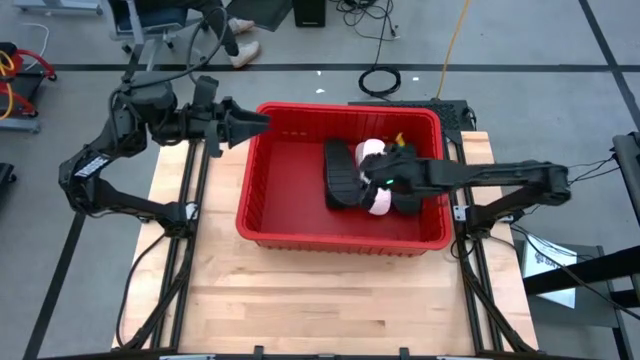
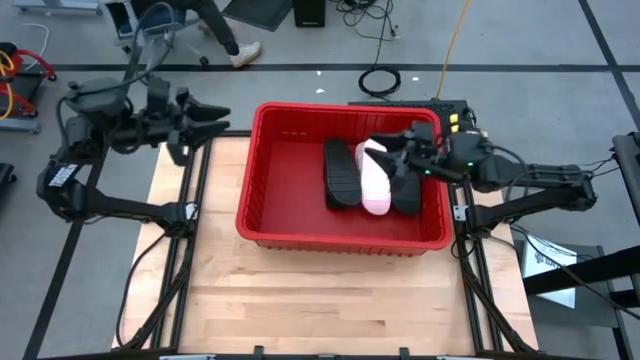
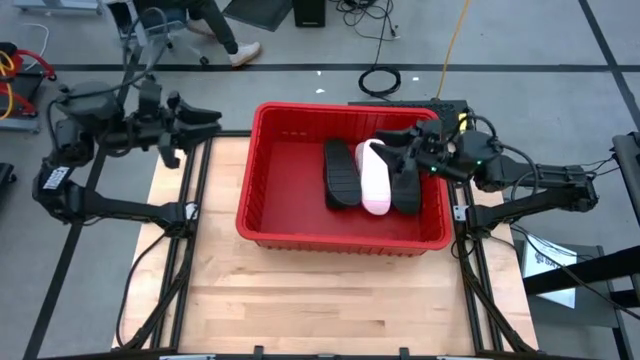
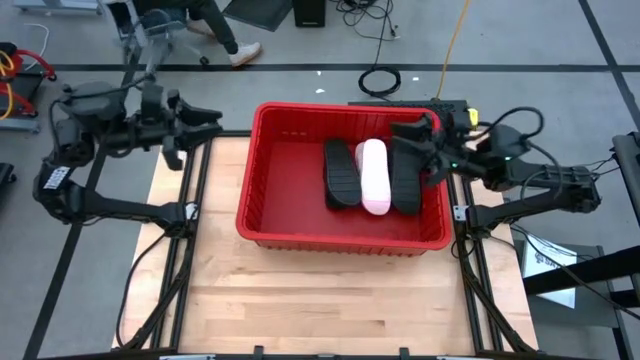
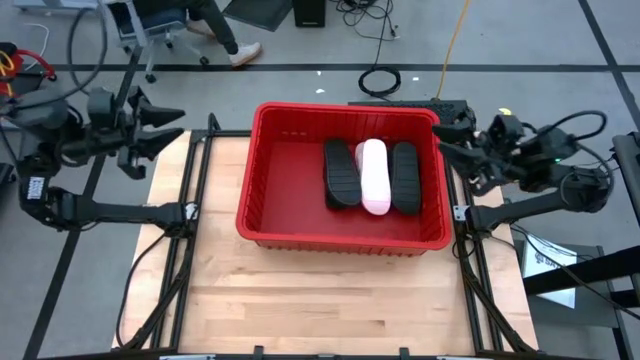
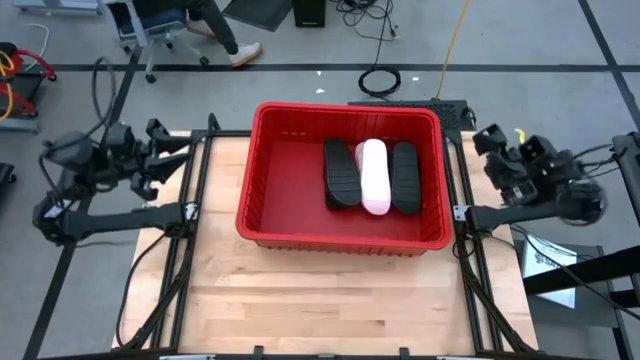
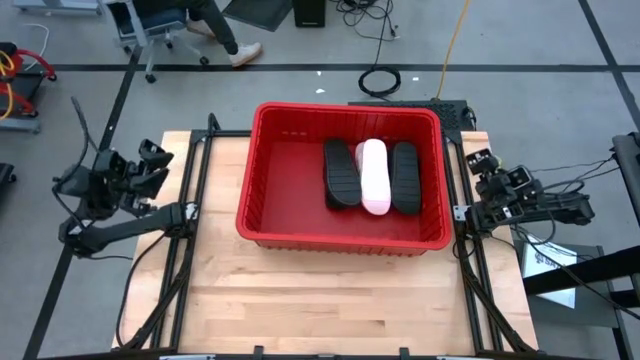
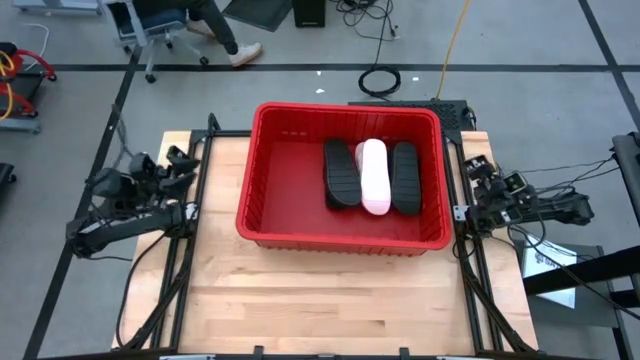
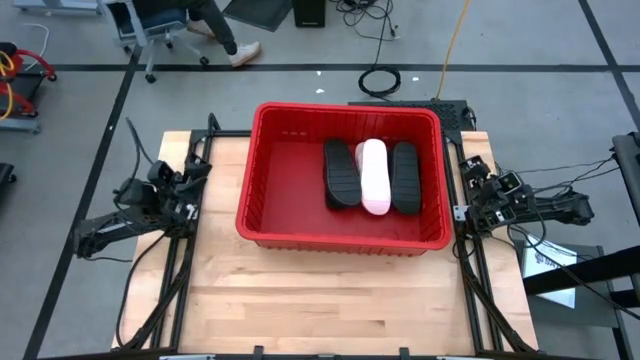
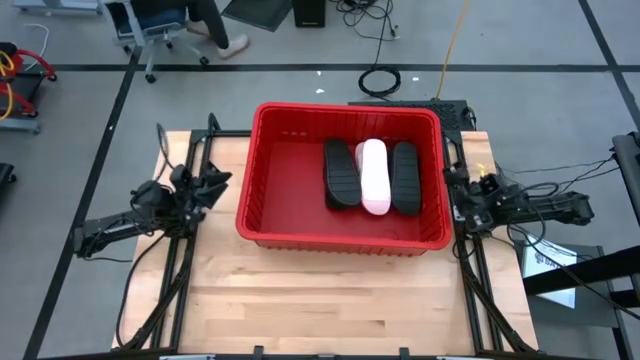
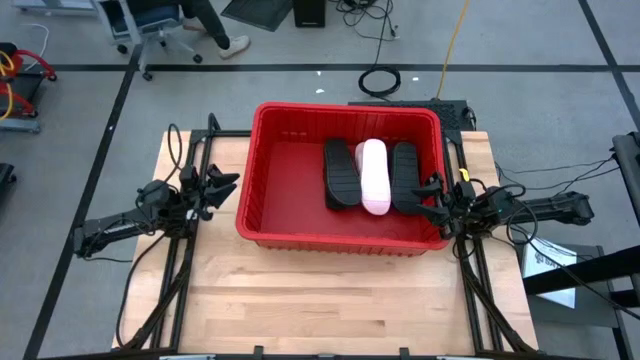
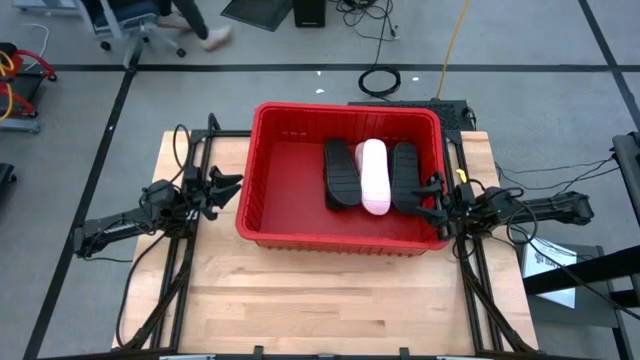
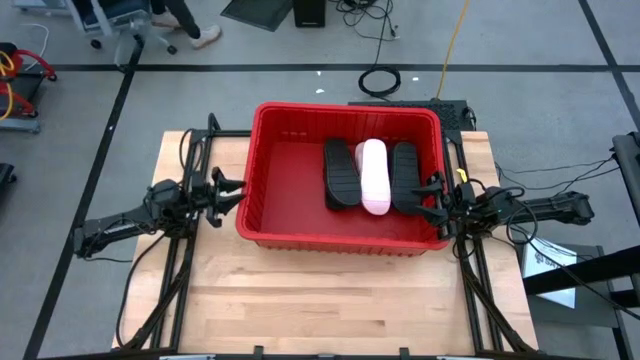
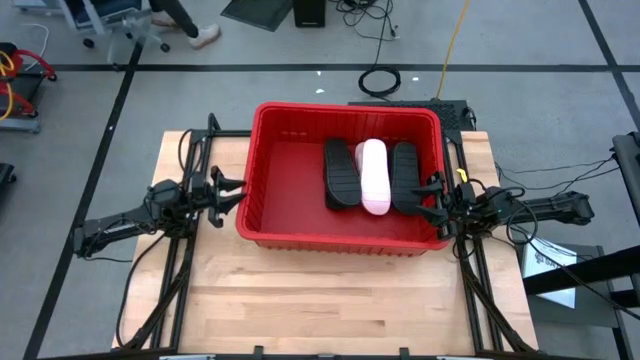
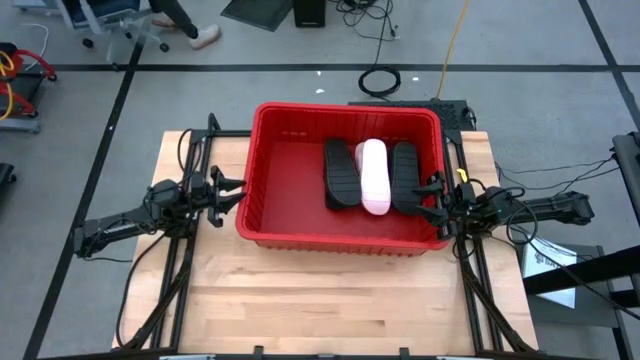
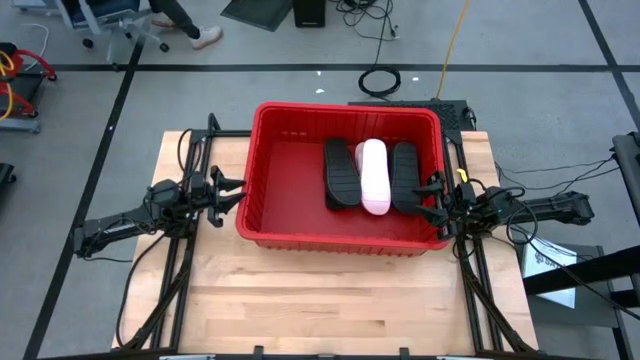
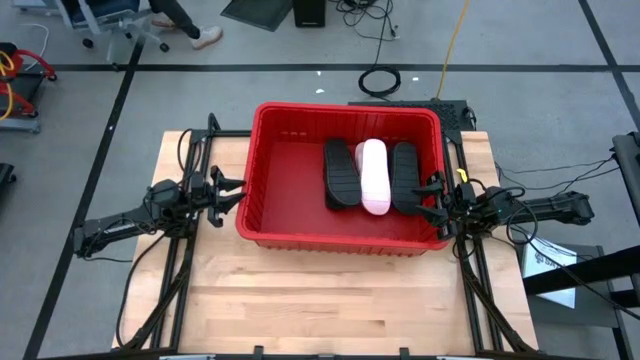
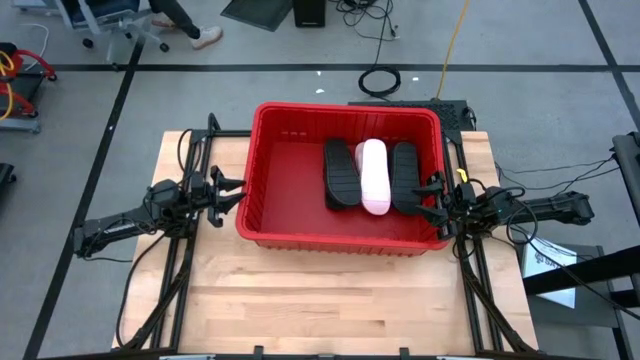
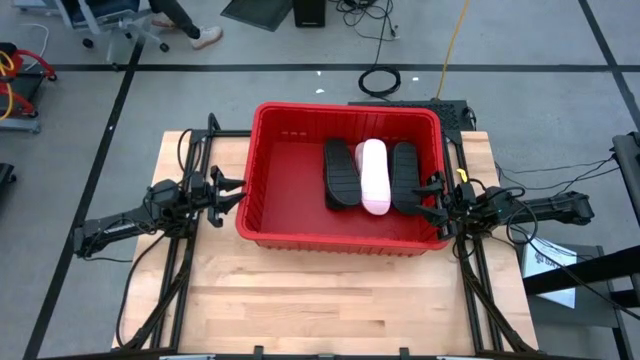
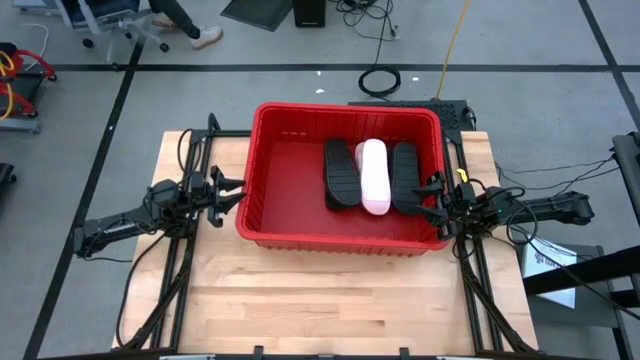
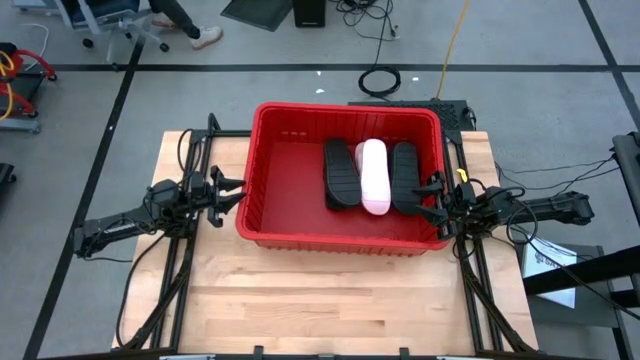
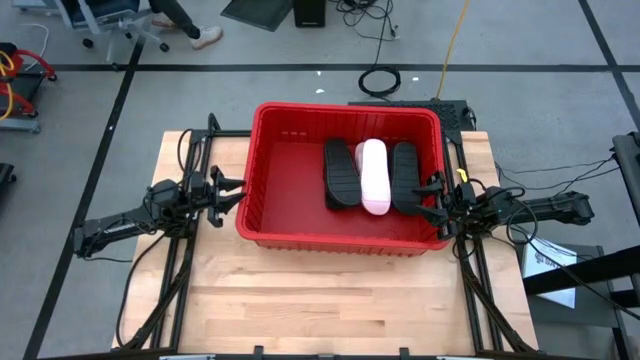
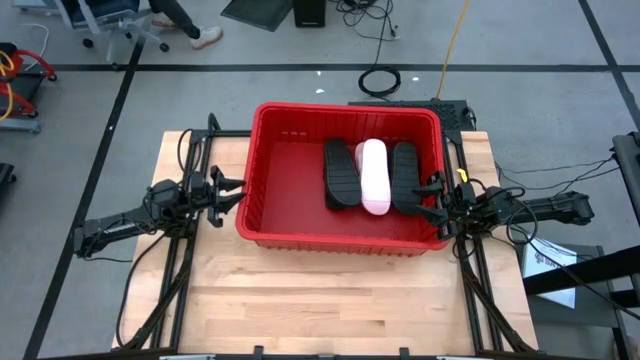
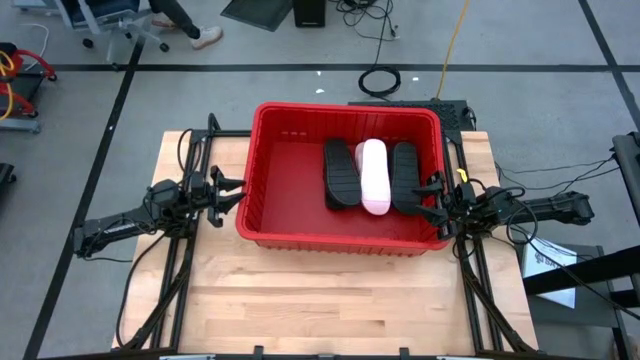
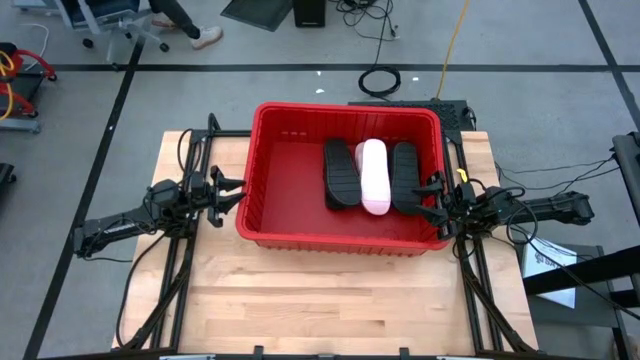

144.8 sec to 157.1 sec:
Task: Pick and place slides into bin
Return to Home Position

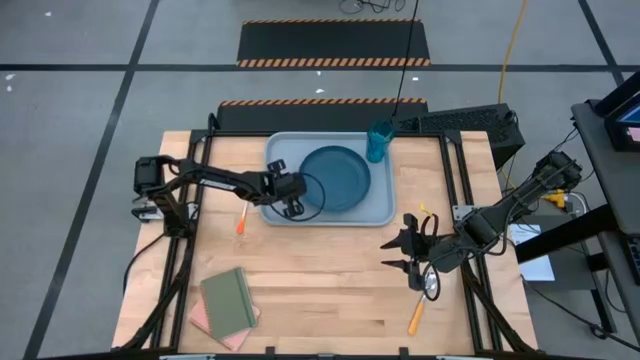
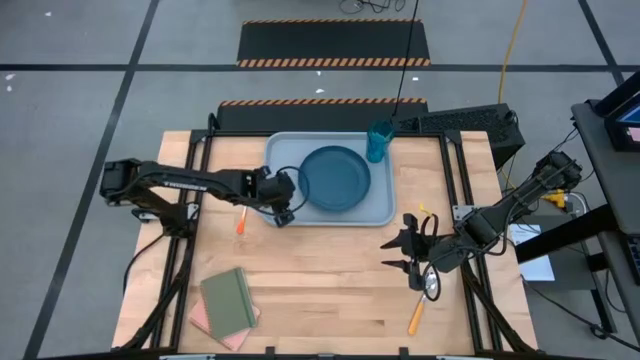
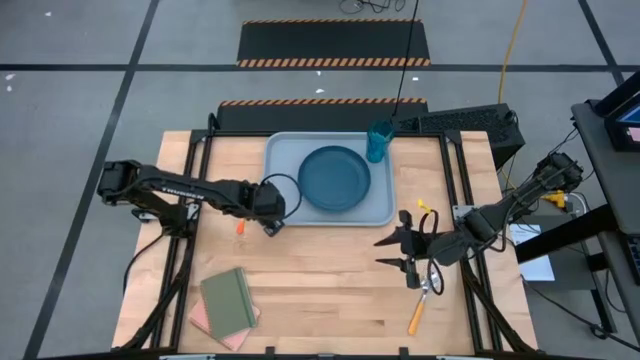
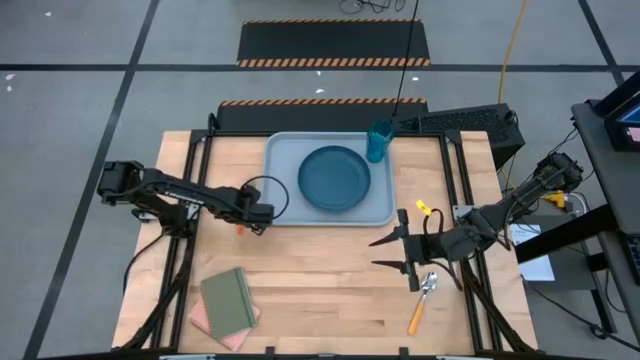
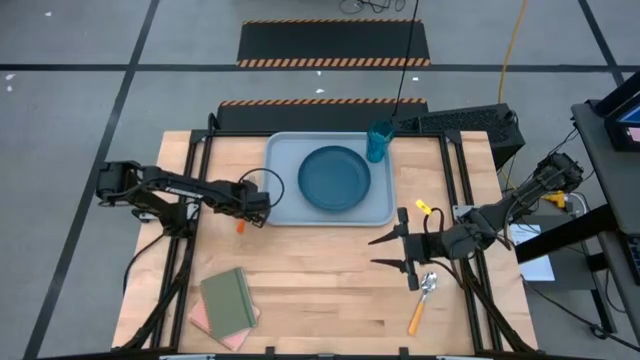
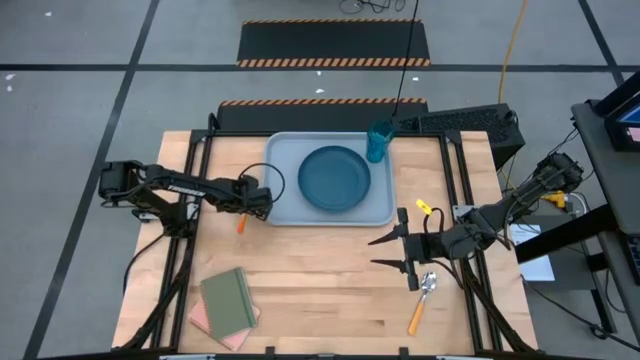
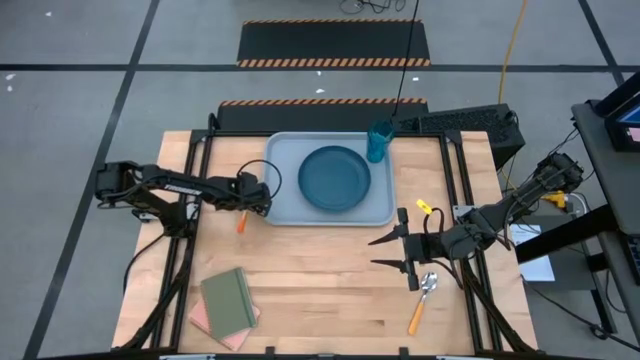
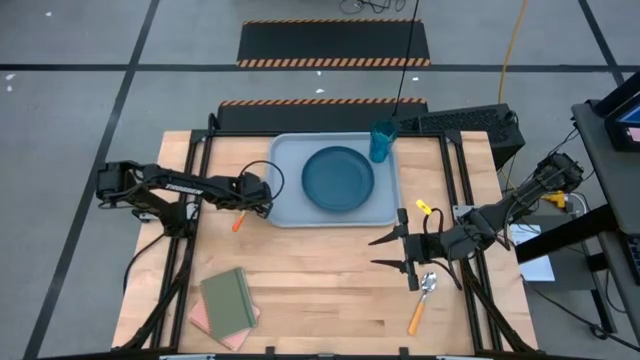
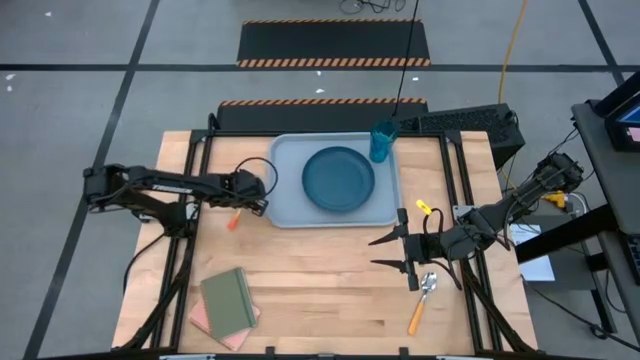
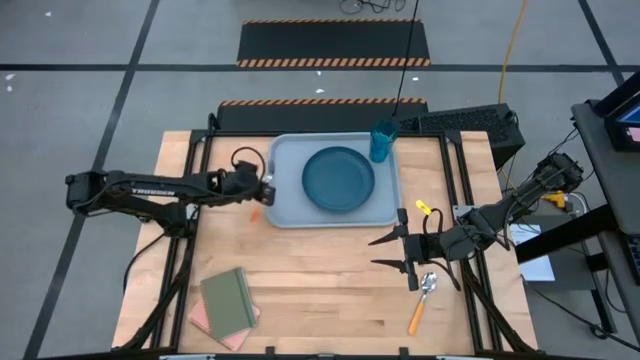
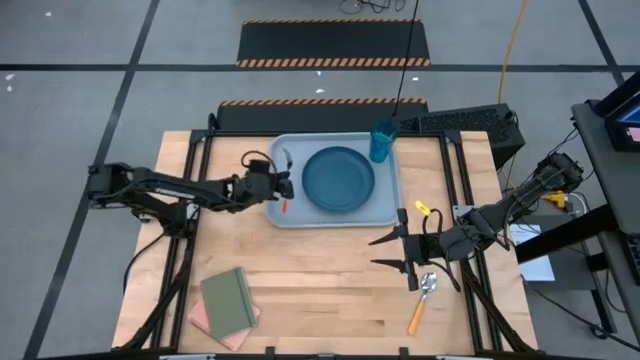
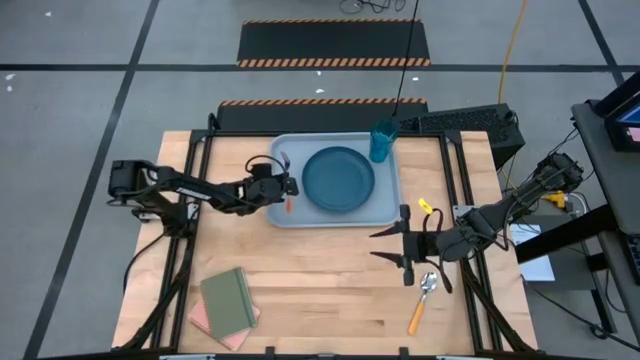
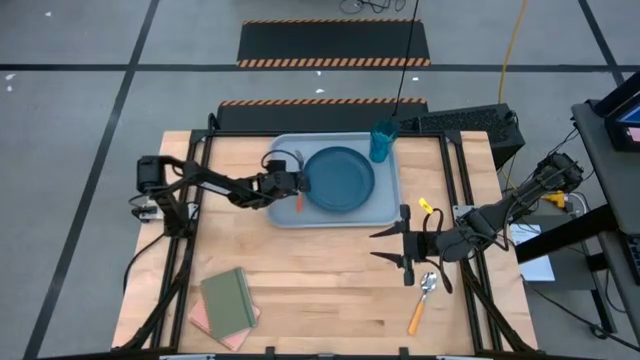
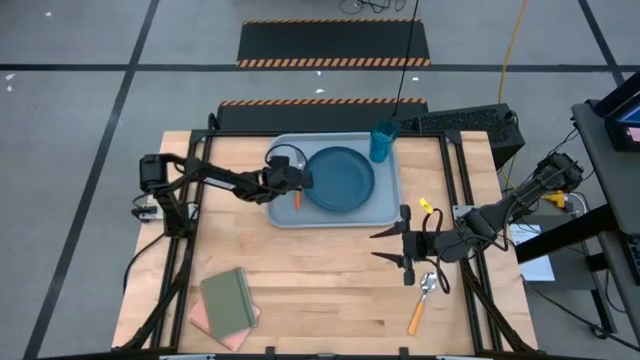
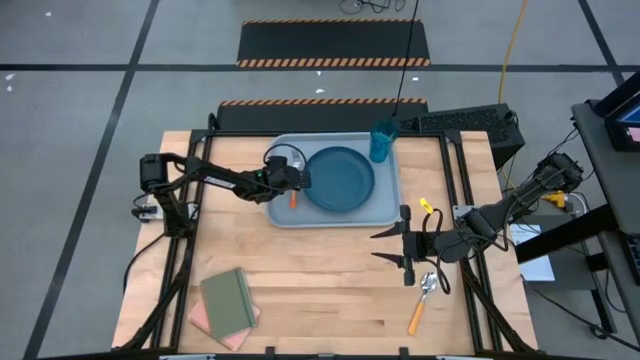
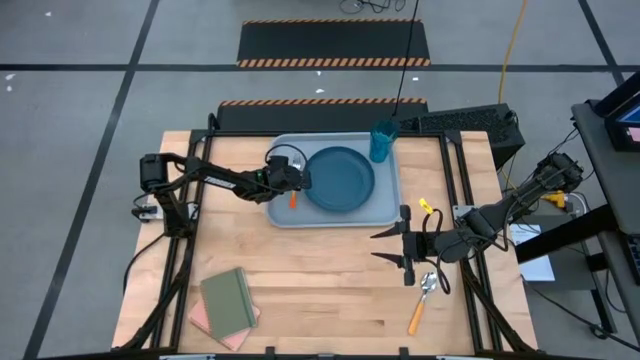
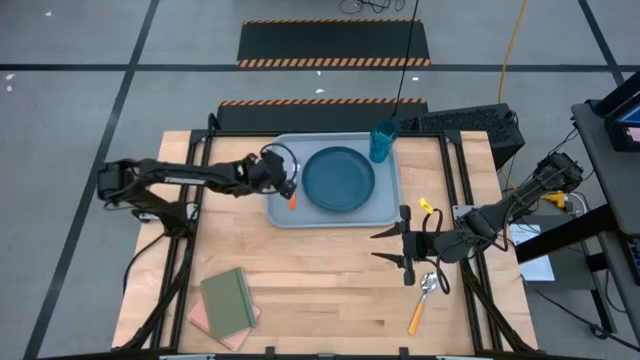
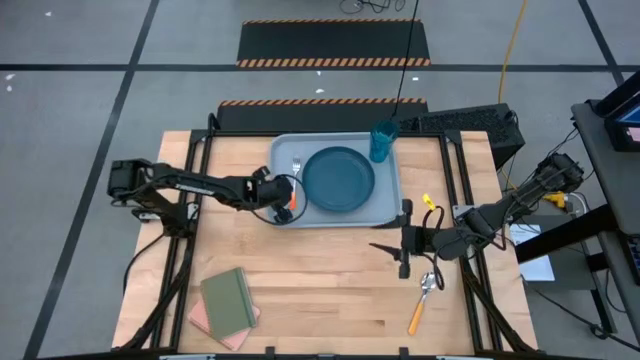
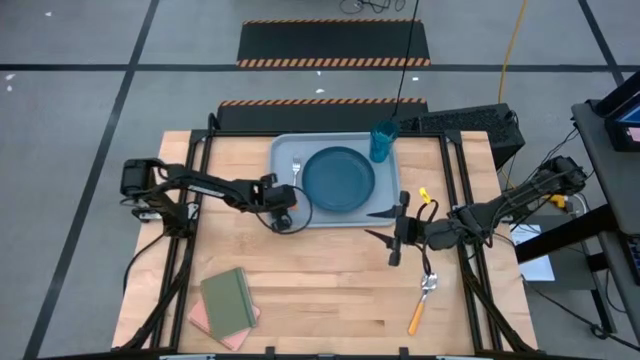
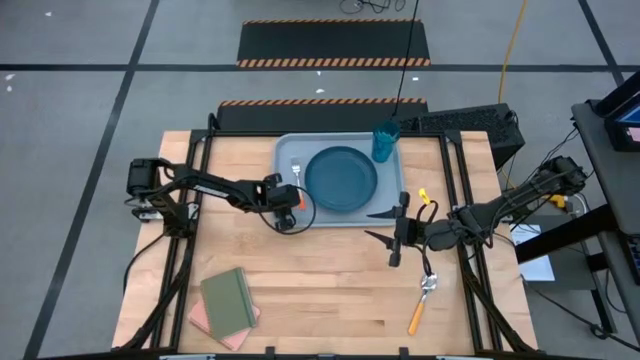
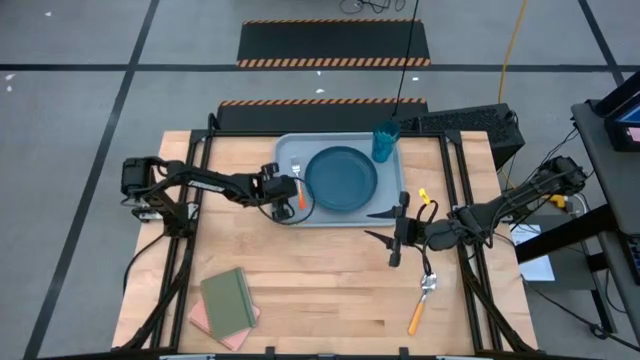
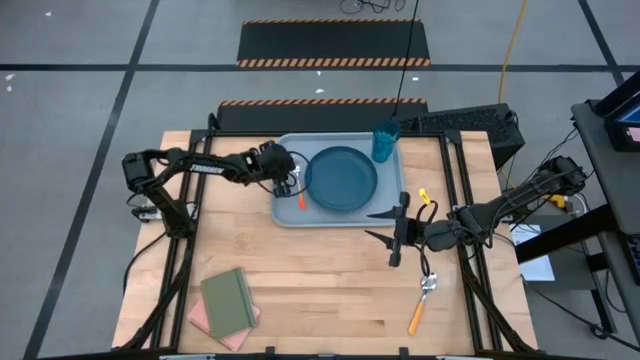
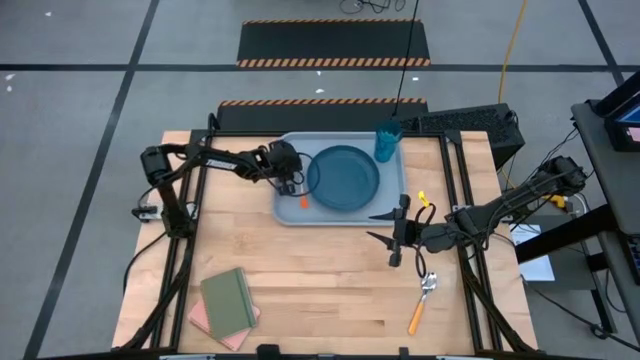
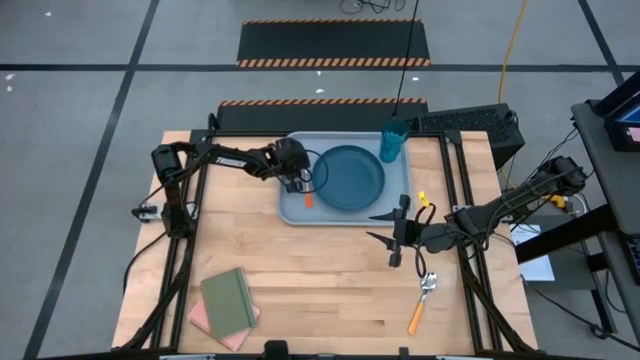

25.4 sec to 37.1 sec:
Task: Pick and place plate/cup/fork/spoon on tray
Put the orange fork to the left of the blue plate on the blue tray
